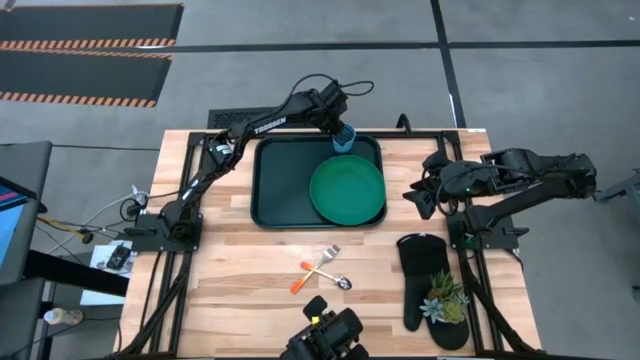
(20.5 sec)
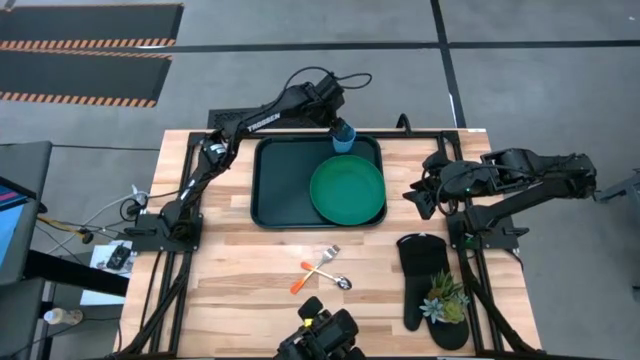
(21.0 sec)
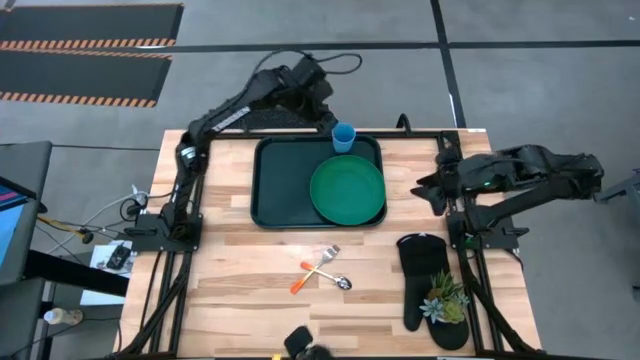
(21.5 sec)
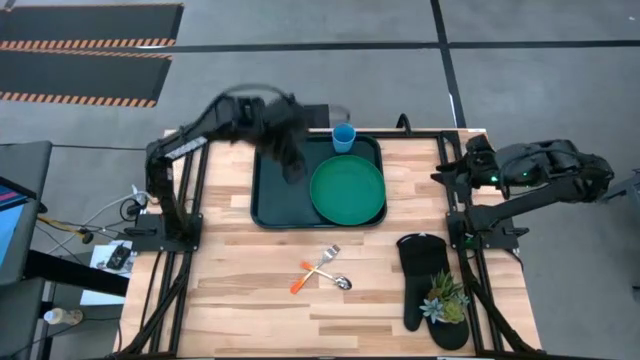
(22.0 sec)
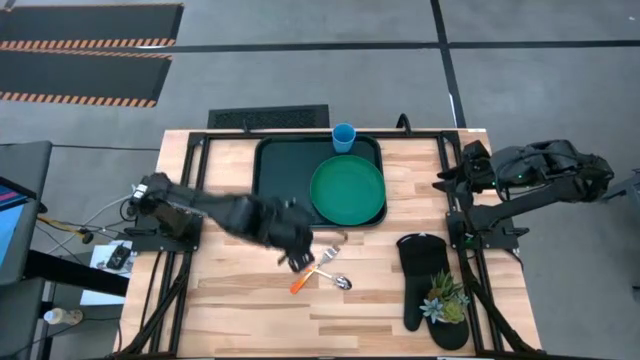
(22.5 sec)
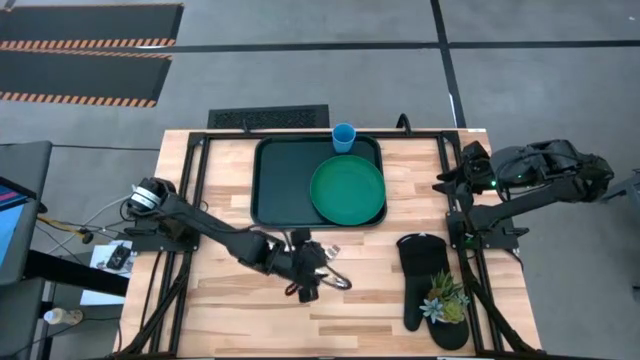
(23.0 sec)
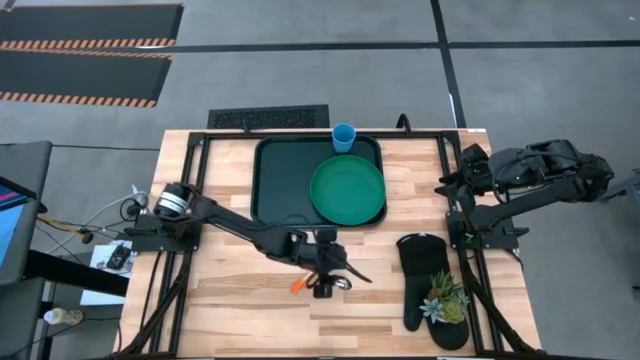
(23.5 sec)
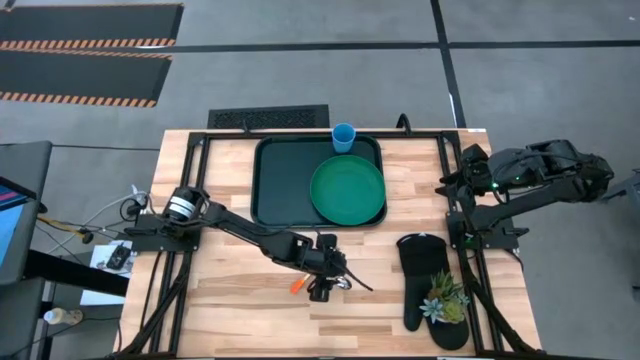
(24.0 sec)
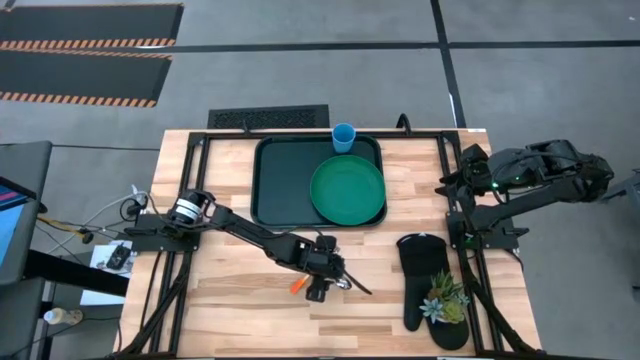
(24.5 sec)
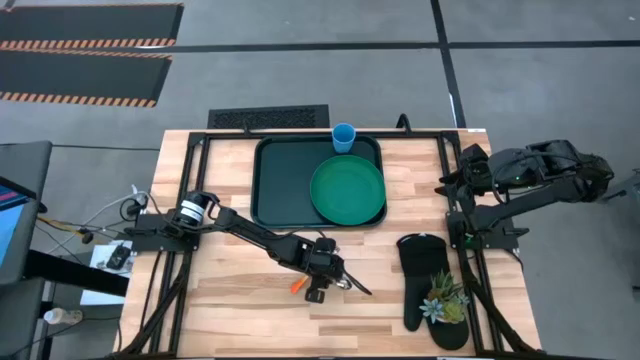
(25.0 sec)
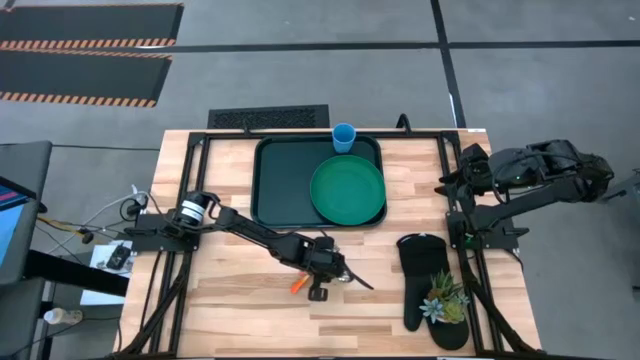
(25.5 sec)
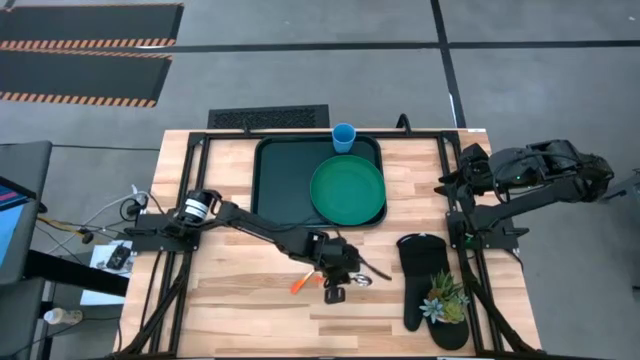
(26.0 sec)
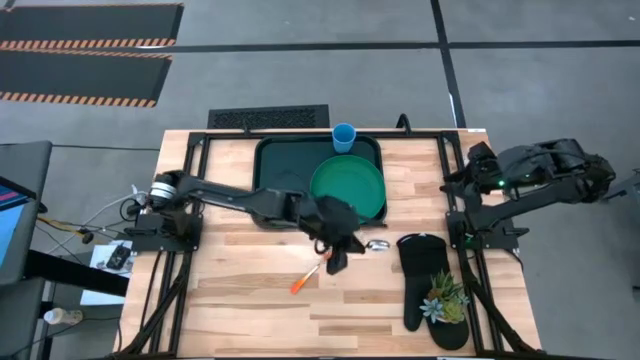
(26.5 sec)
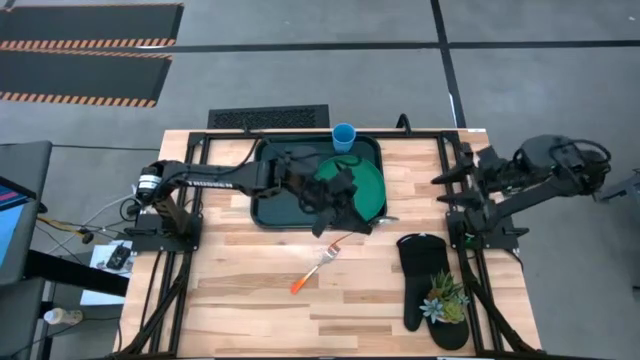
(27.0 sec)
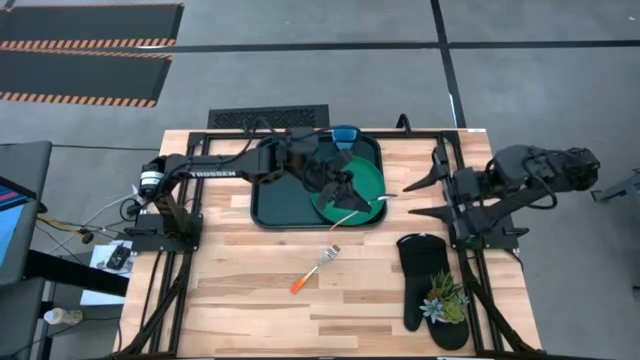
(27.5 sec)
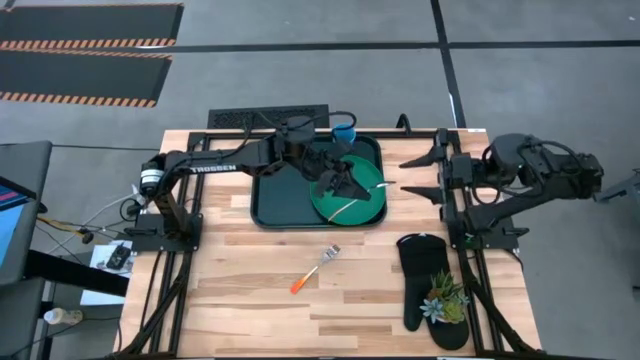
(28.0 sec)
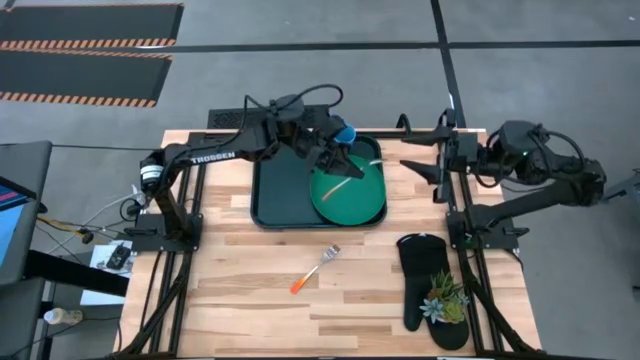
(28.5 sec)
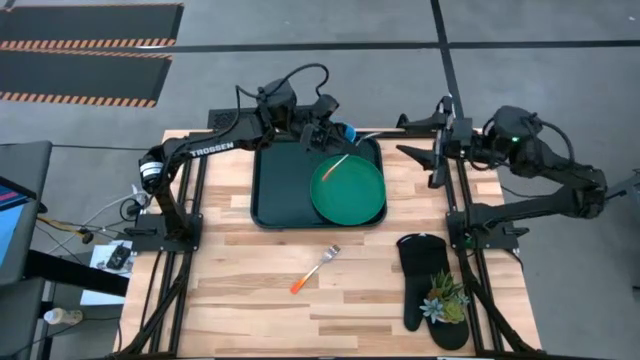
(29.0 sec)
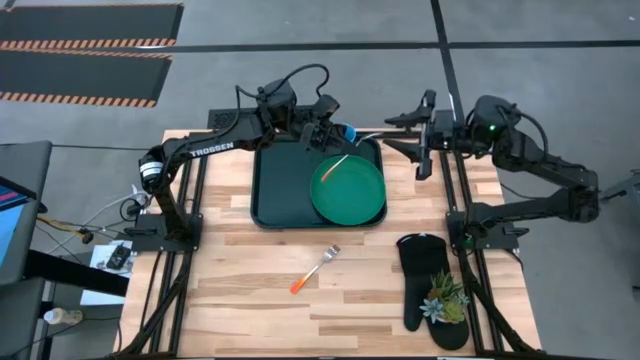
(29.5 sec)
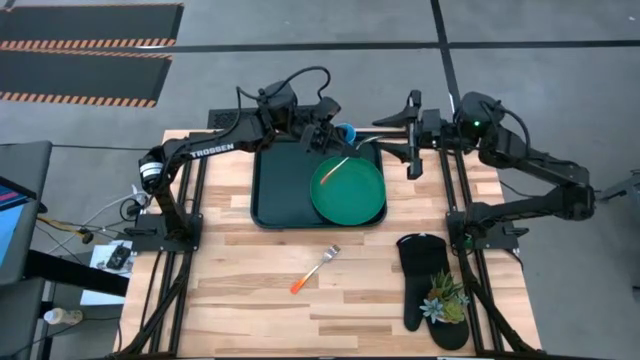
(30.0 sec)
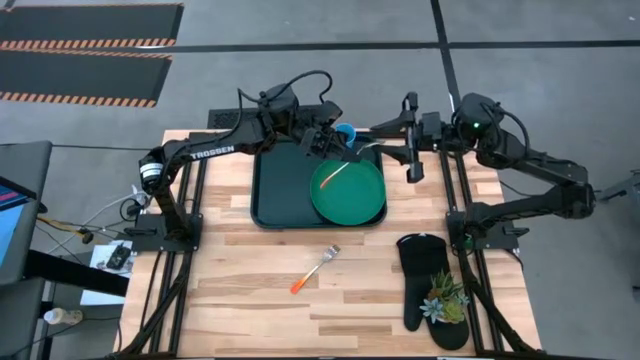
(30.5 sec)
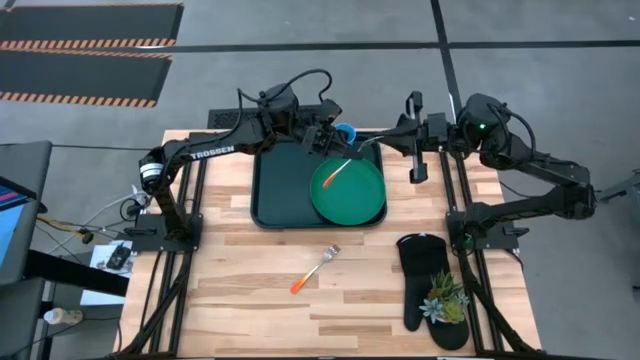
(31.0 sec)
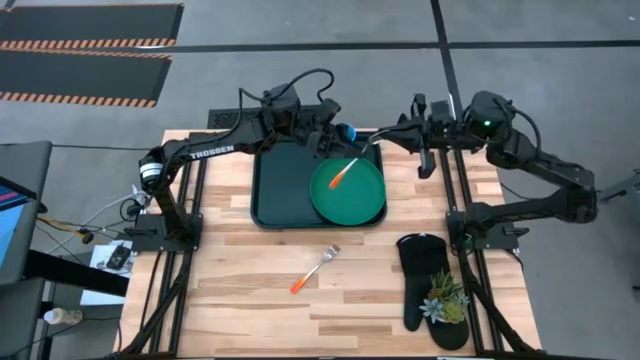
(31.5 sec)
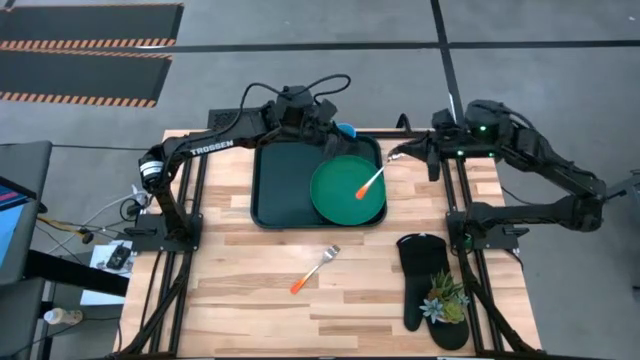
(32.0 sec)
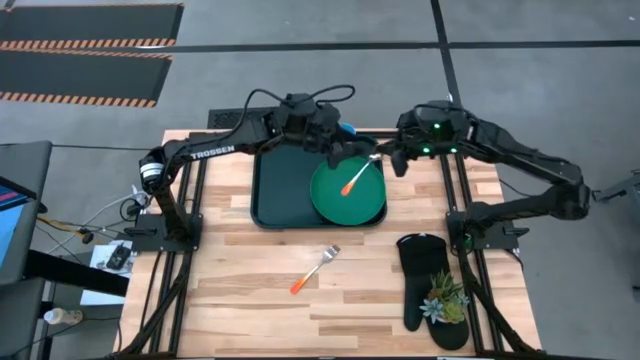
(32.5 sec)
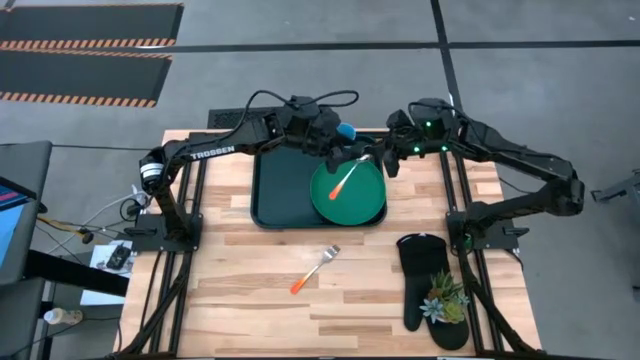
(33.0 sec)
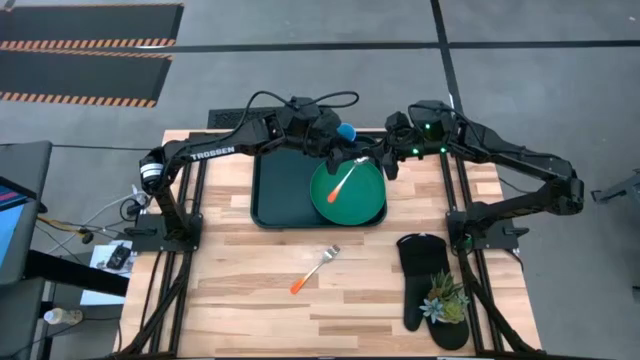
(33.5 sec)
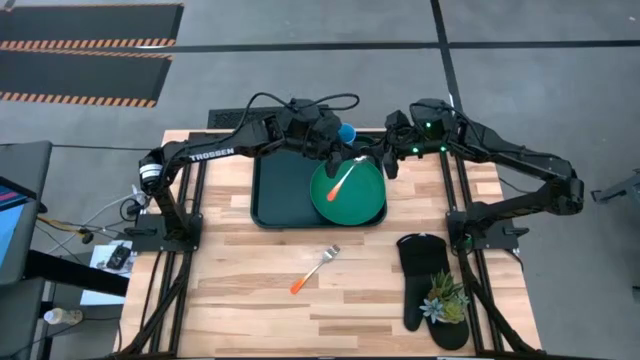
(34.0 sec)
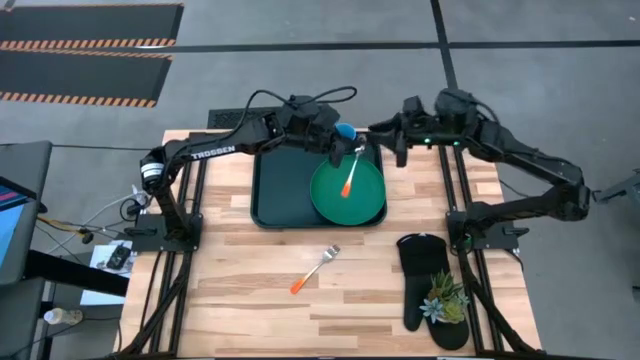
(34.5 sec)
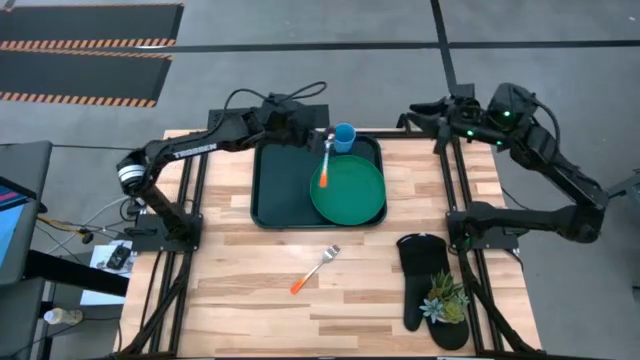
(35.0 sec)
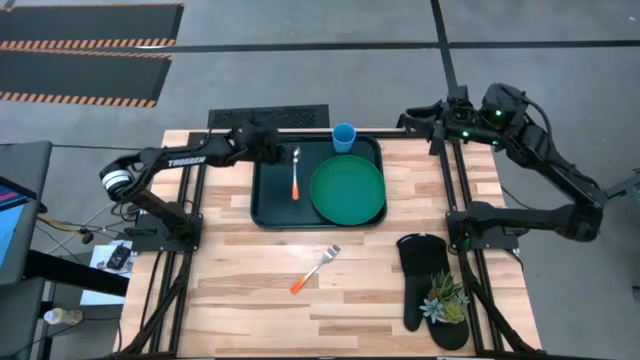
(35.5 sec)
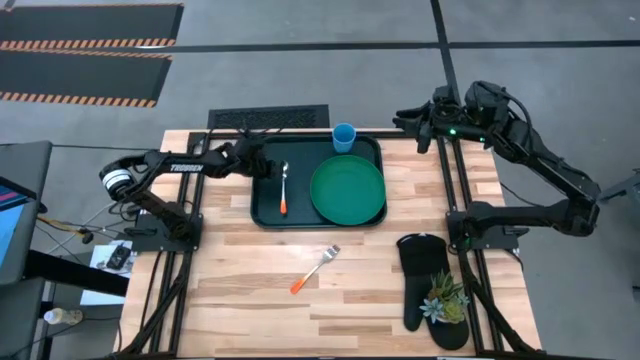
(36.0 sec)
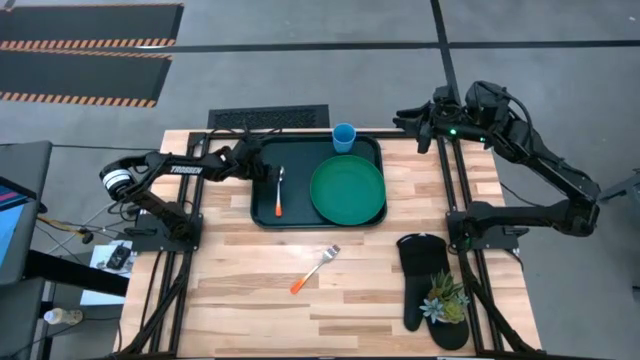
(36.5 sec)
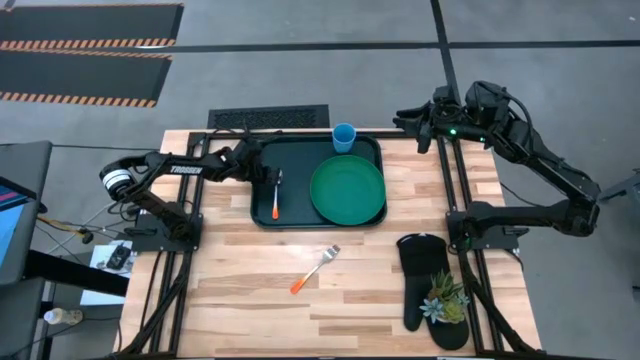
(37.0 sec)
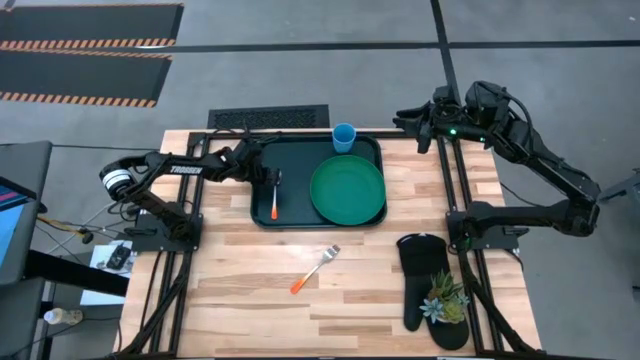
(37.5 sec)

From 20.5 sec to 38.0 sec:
Task: Pick and place plate/cup/fork/spoon on tray
Put the orange spoon to the left of the green plate on the black tray
